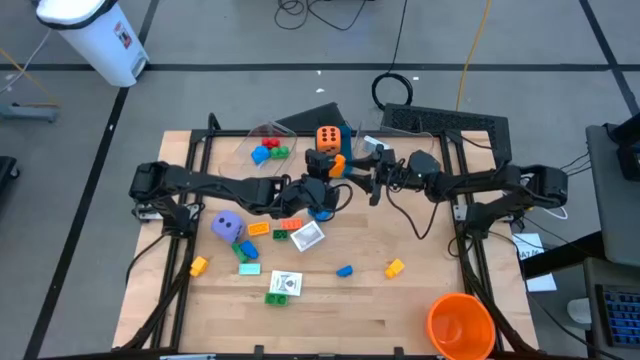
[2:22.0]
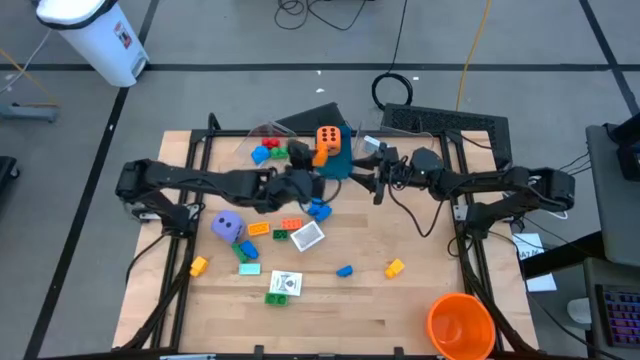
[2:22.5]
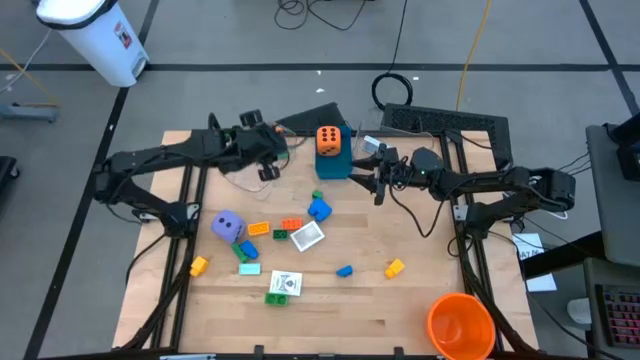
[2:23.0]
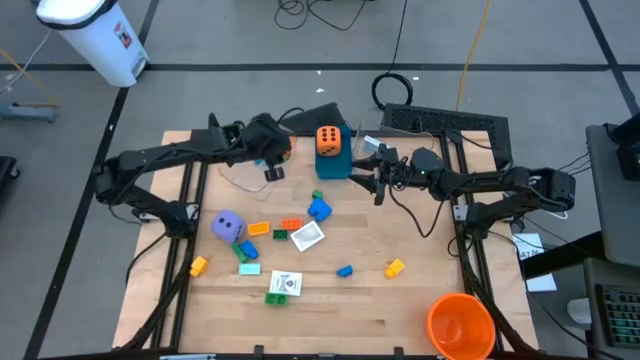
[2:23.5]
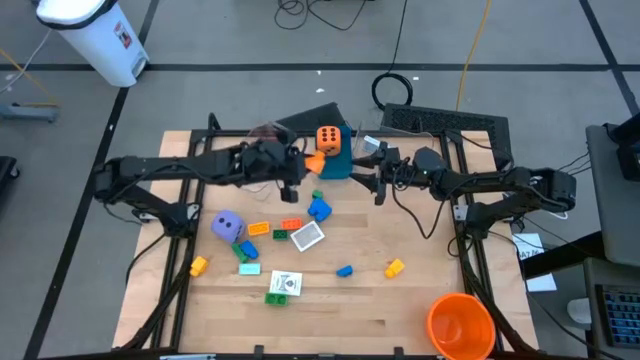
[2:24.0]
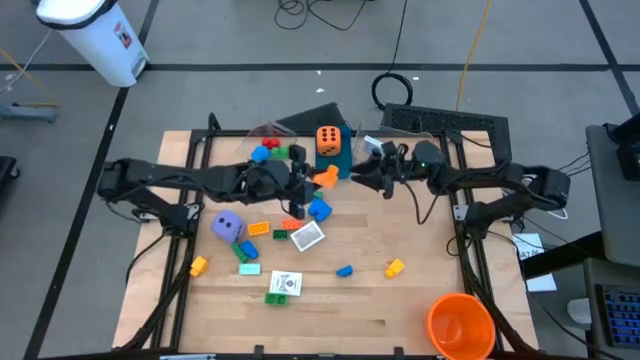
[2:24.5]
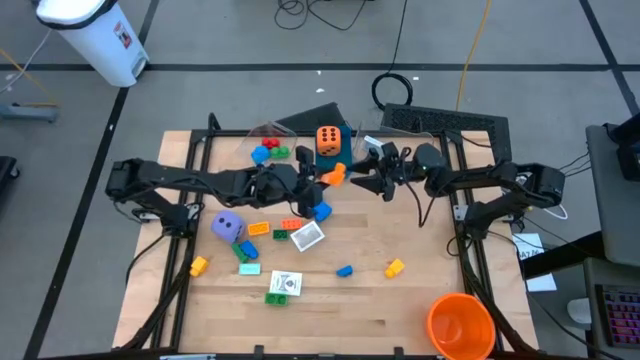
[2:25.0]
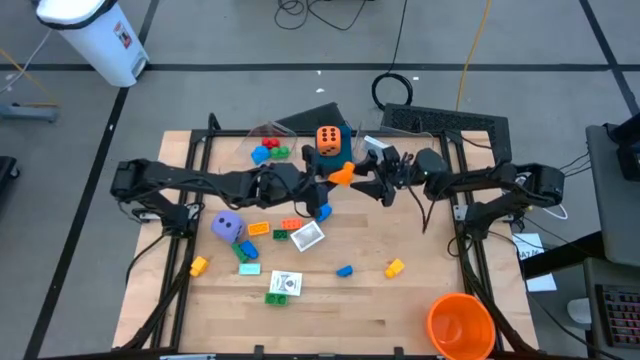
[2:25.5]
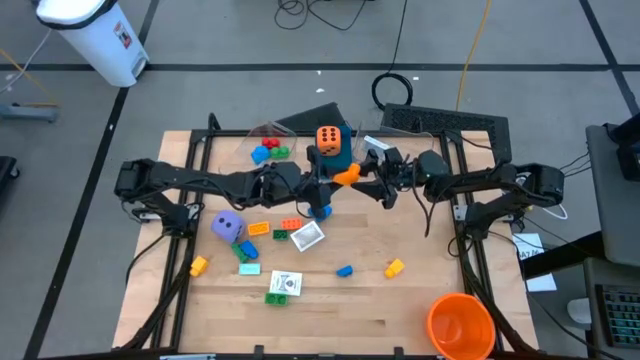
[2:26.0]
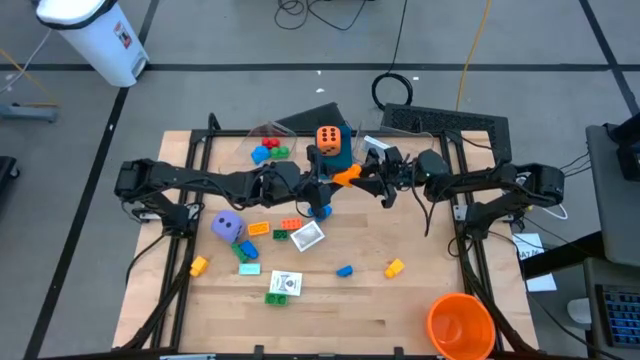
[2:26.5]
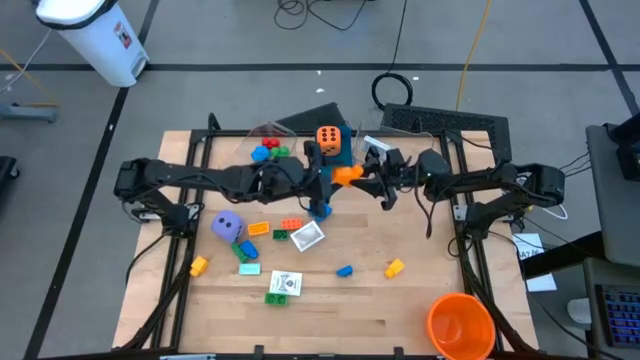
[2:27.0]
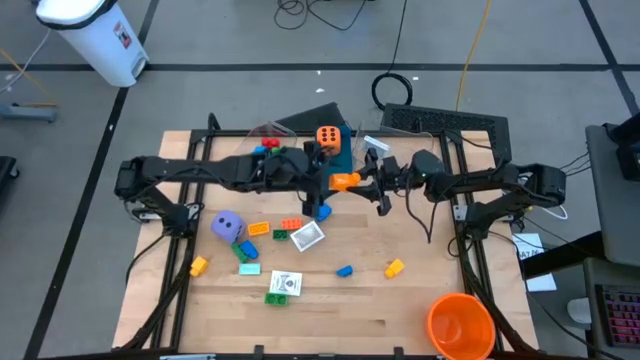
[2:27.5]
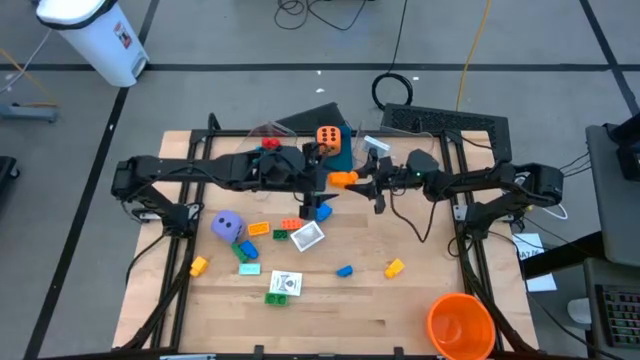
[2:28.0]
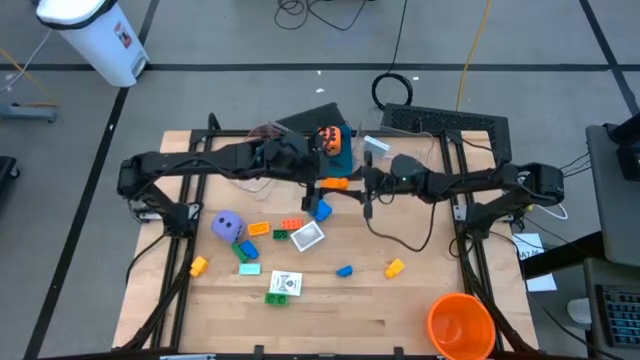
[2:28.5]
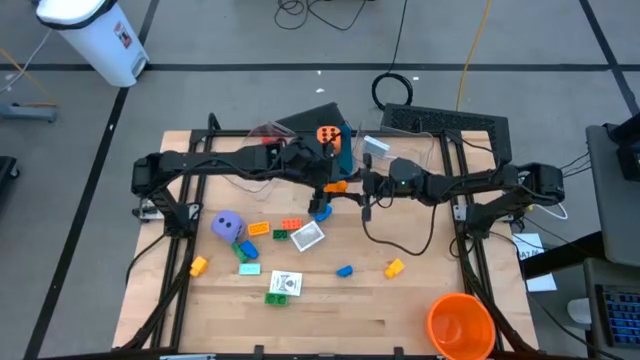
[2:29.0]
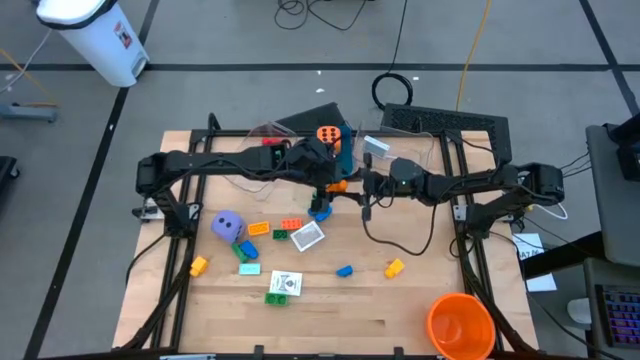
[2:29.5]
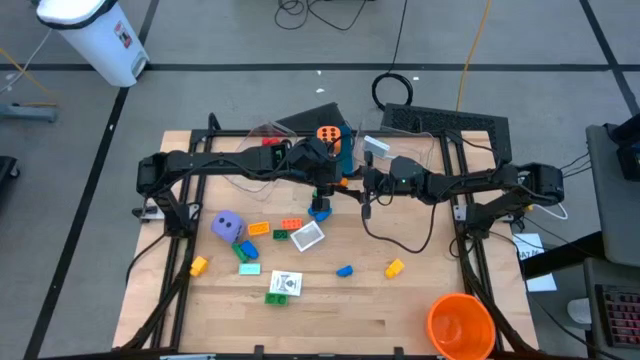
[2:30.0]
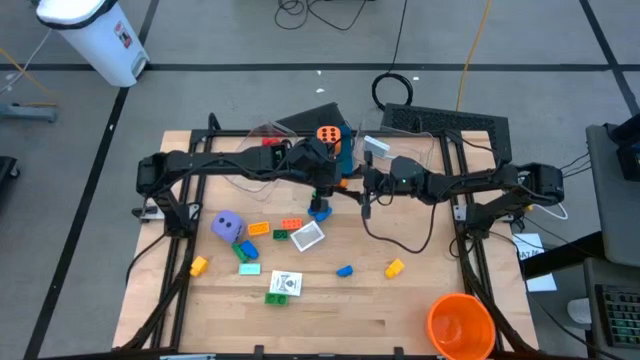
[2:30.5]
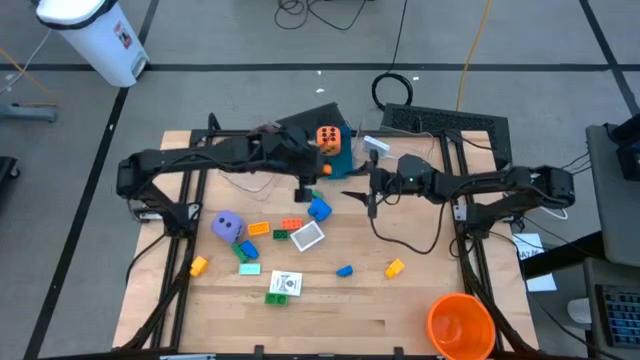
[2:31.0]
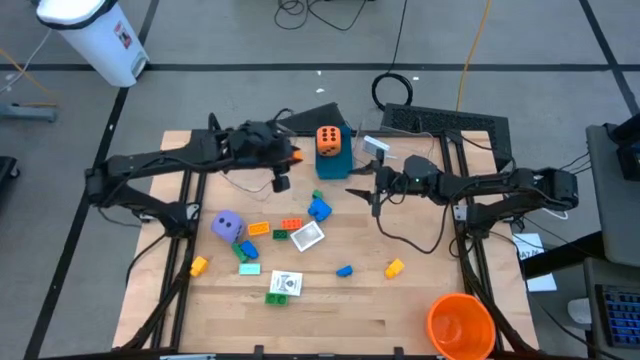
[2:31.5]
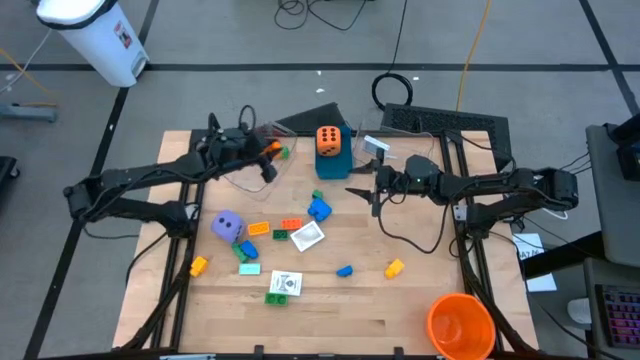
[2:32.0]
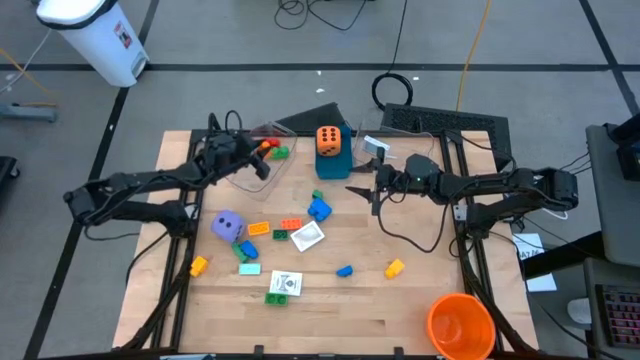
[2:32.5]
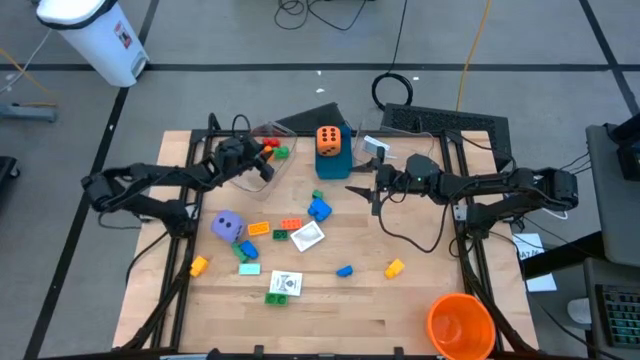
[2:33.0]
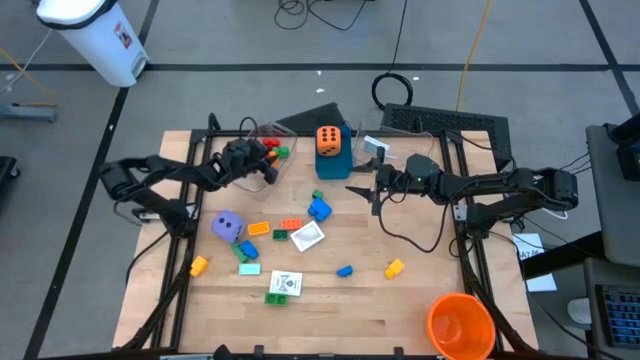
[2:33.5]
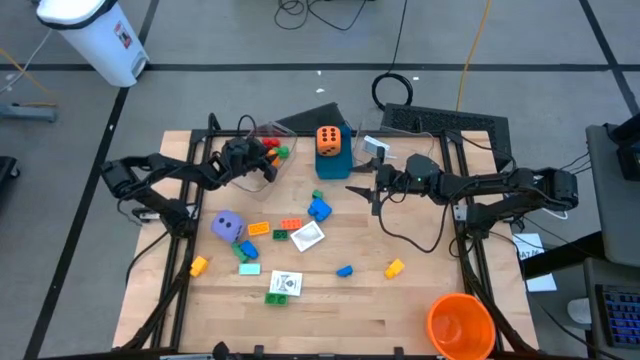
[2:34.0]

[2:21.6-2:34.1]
Task: Pick & Place Toys
Put the orange game piece into the left transparent bin

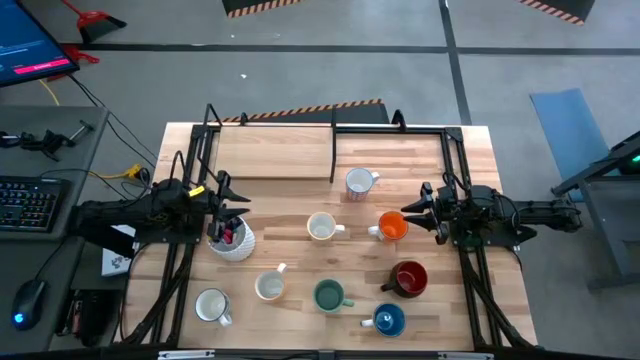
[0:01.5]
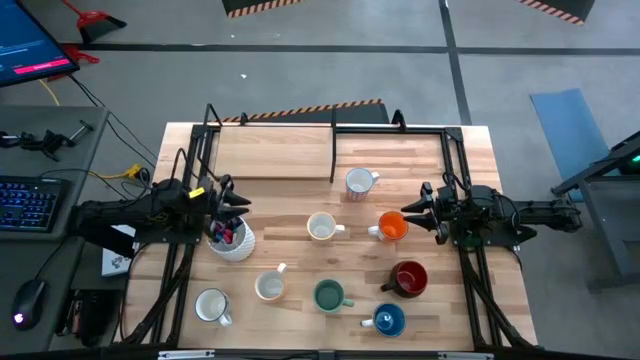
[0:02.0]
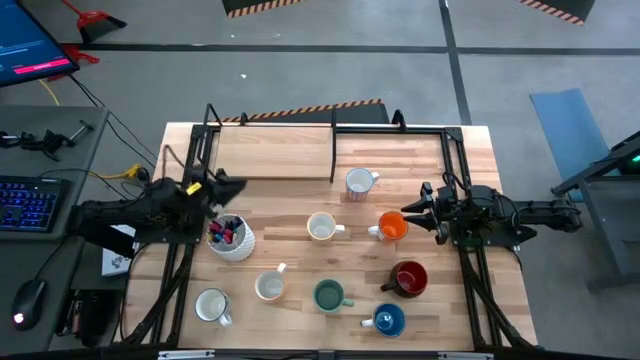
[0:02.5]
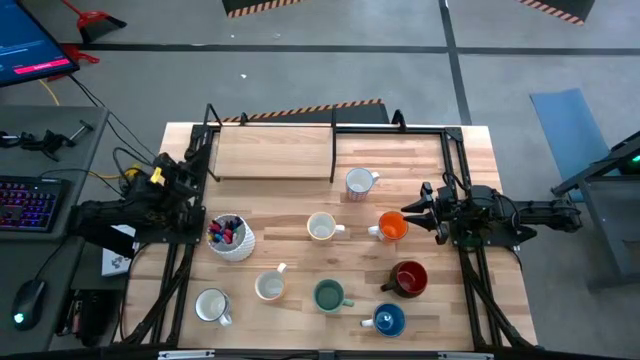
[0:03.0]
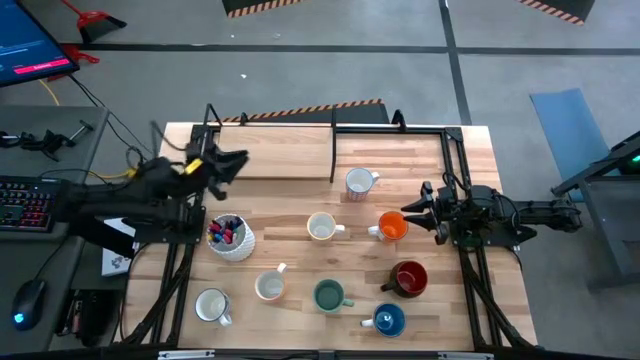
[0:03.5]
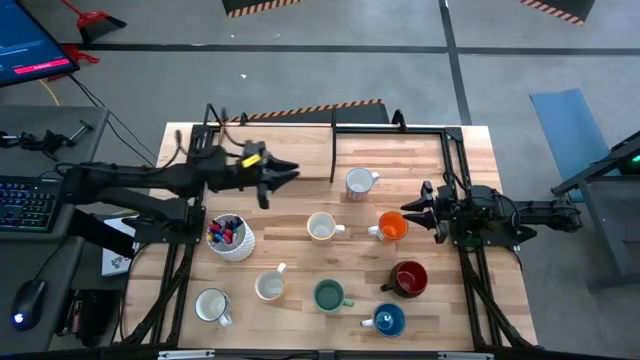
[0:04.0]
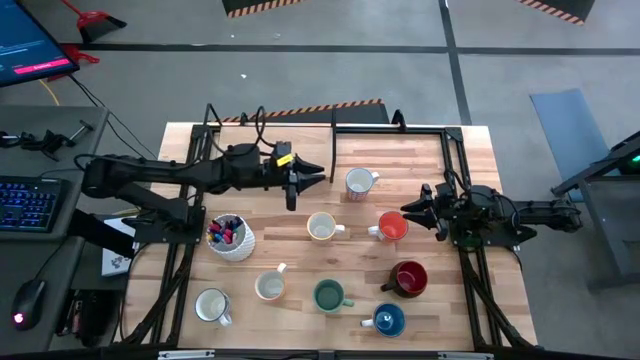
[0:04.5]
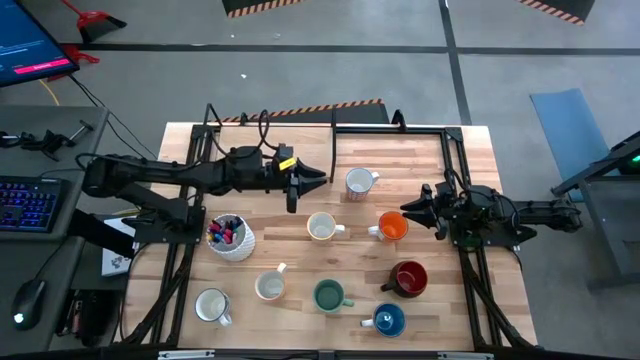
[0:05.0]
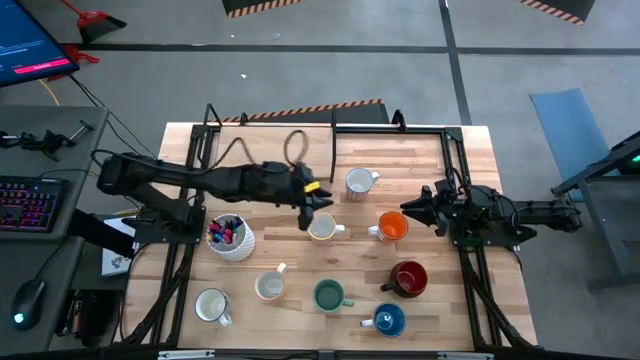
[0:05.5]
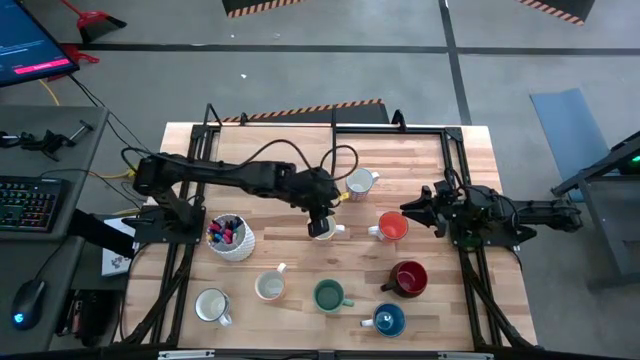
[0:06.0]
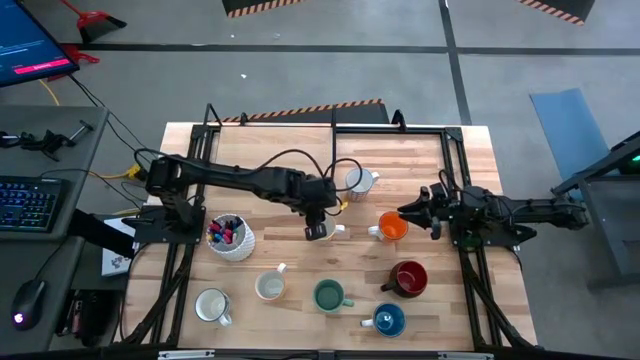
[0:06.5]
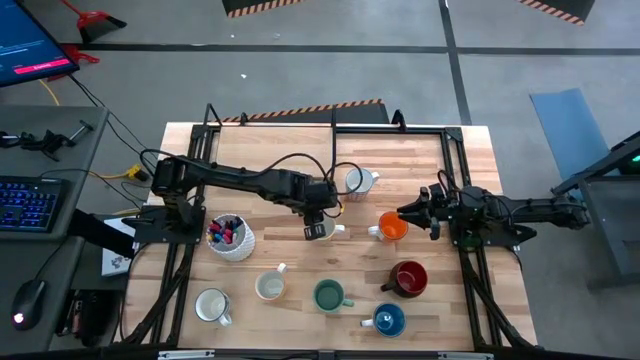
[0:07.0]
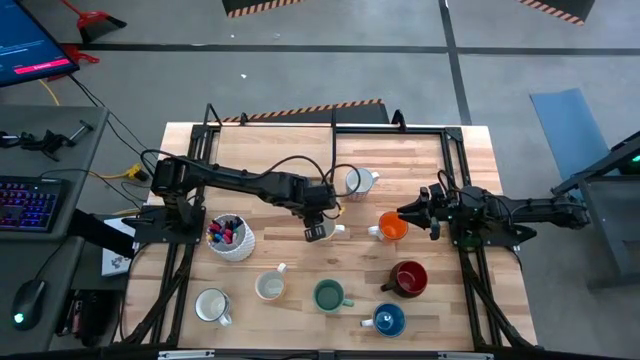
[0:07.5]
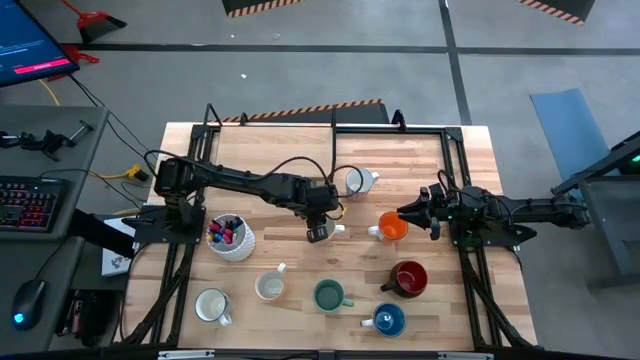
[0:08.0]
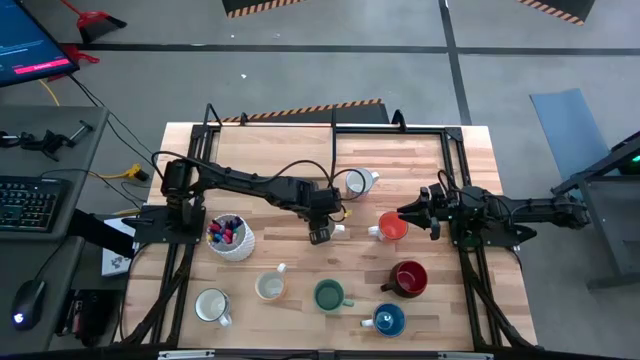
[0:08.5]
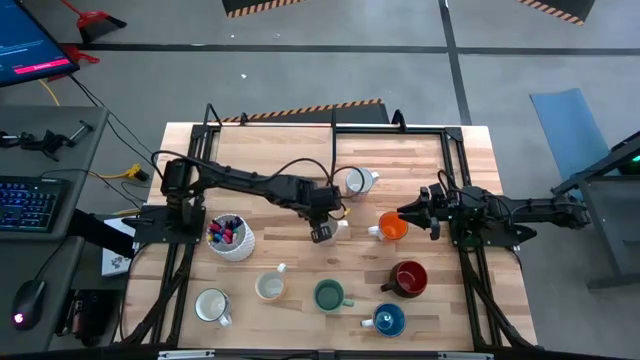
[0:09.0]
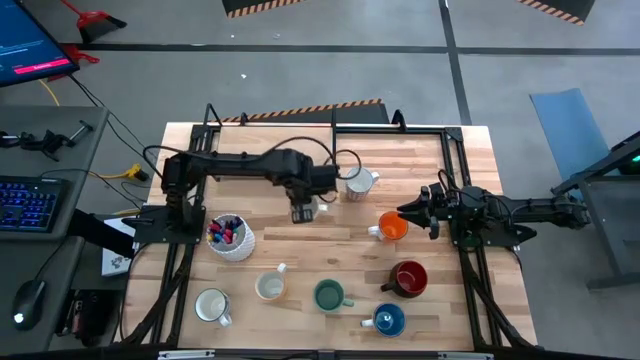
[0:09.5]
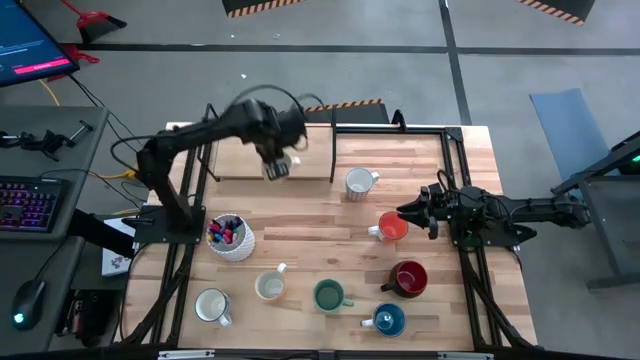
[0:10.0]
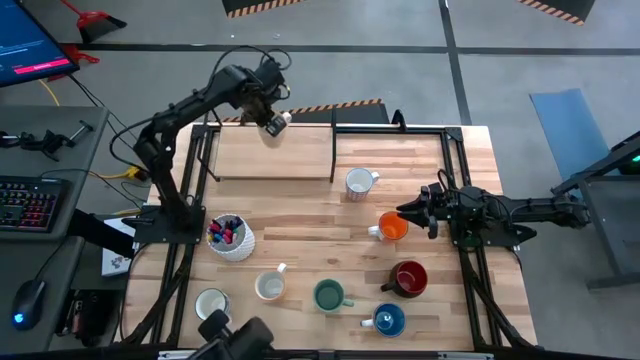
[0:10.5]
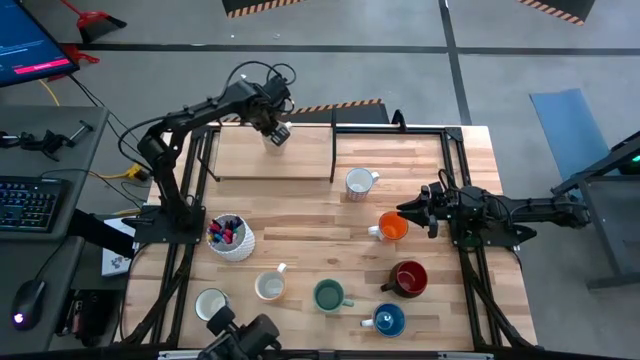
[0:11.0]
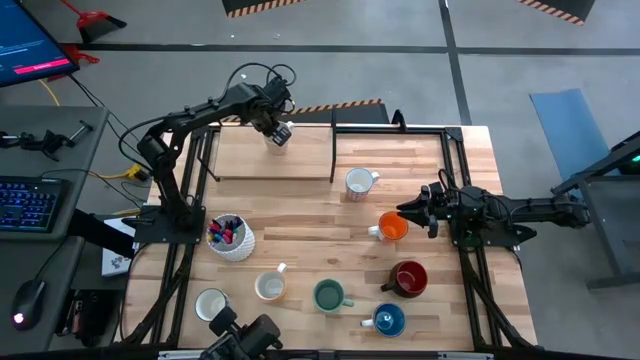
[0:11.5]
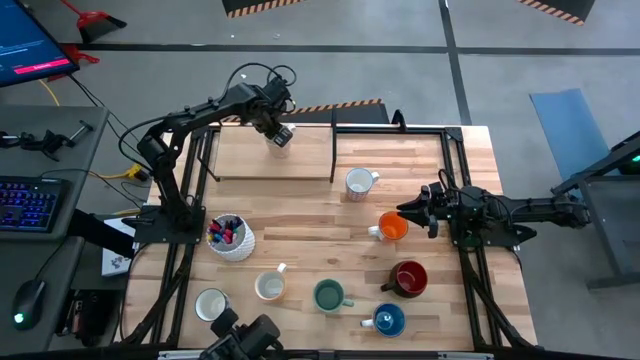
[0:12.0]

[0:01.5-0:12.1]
Task: Place coffee mugs
Put the orange patterned mug on the shelf
